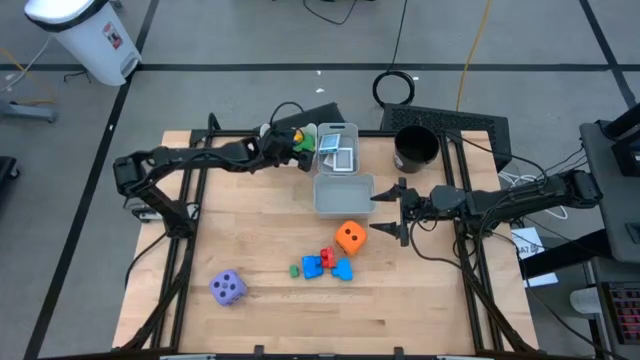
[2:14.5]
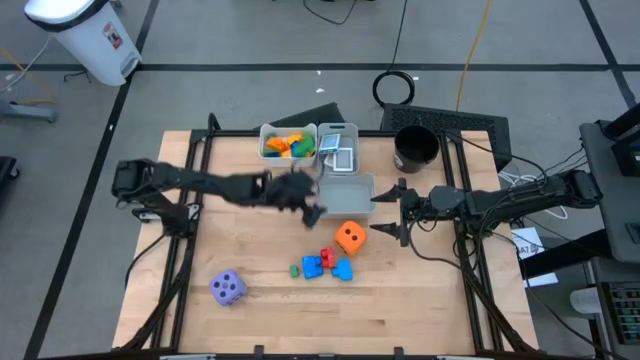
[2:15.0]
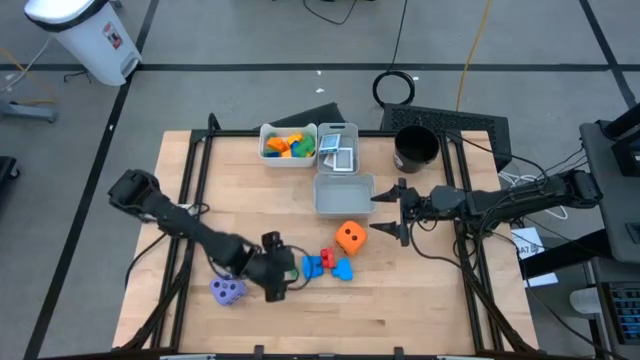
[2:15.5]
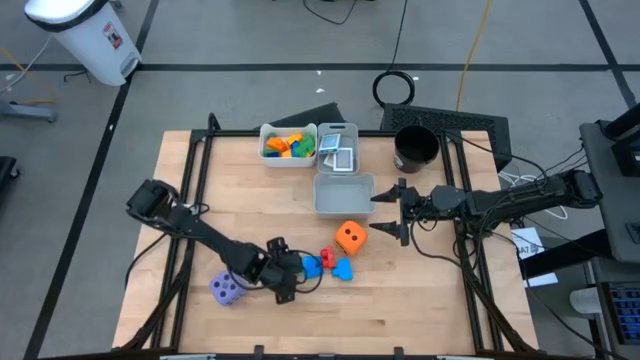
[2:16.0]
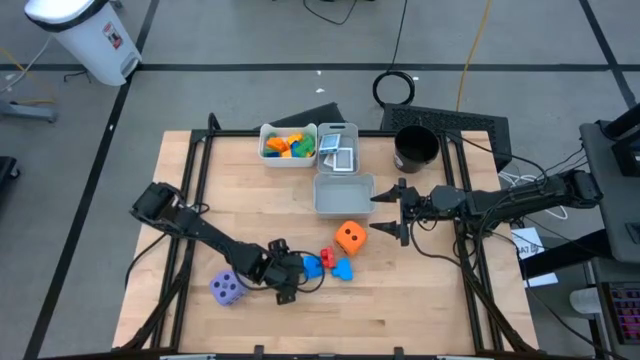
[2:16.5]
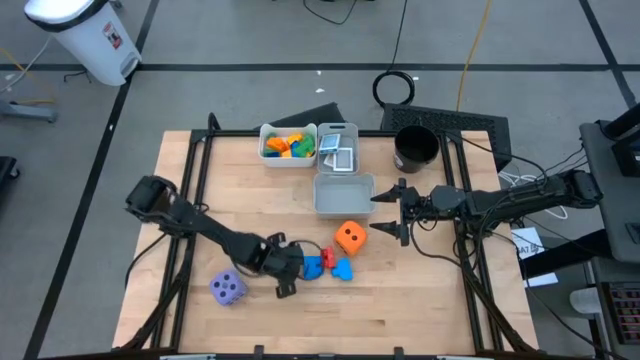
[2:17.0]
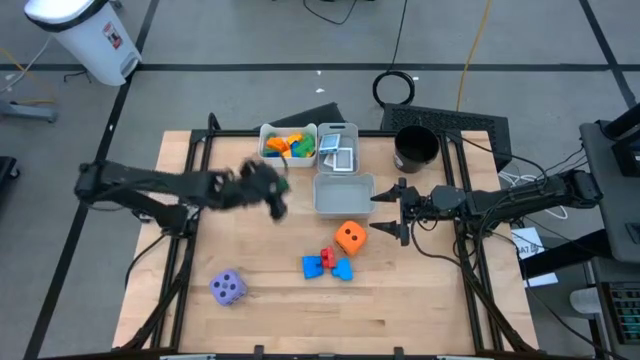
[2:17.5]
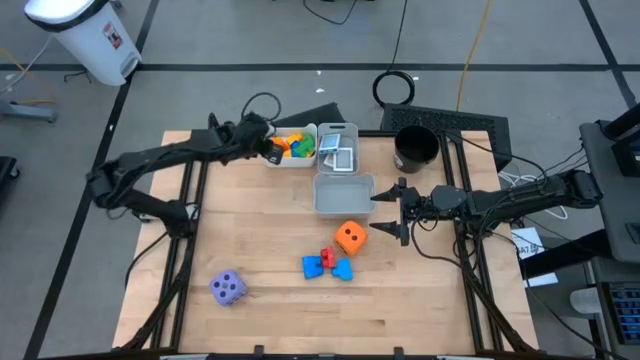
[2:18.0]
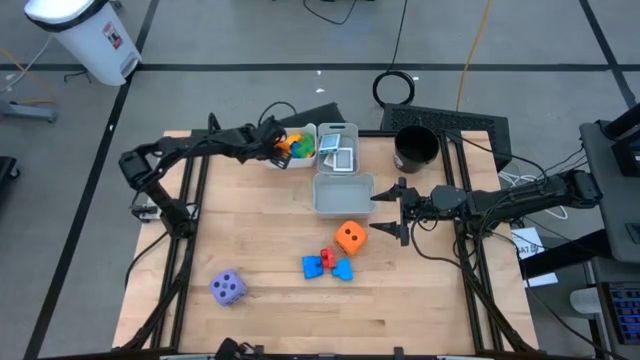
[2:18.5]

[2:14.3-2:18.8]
Task: Pick & Place Toys
Put the green game piece into the white bin

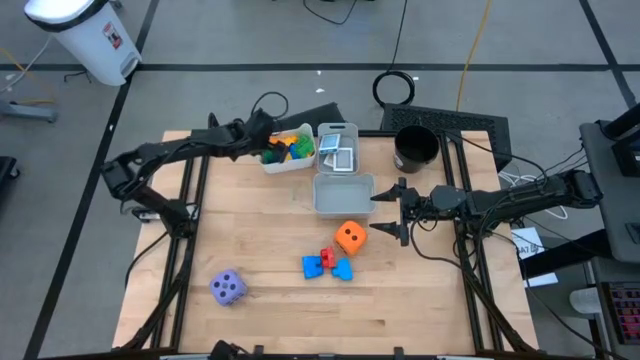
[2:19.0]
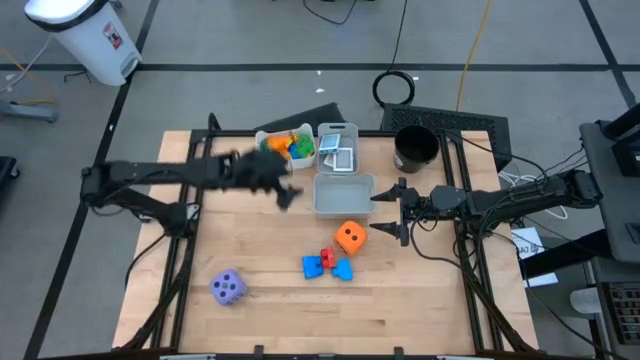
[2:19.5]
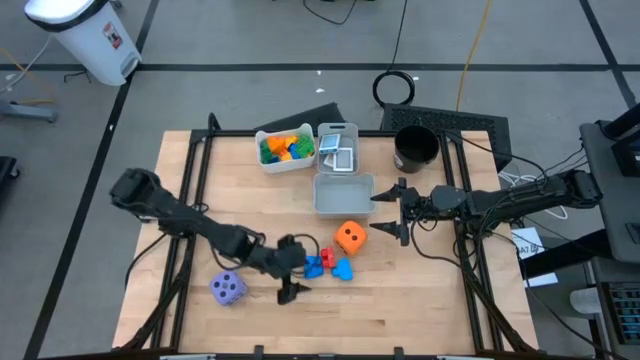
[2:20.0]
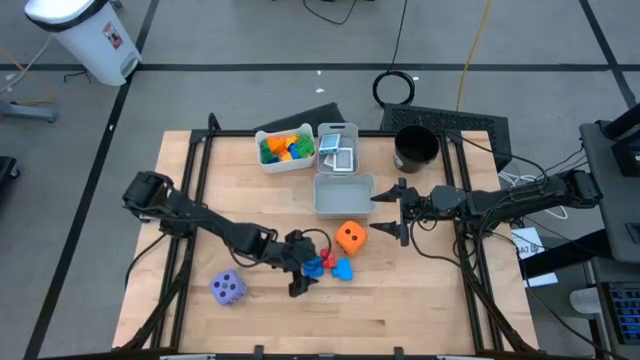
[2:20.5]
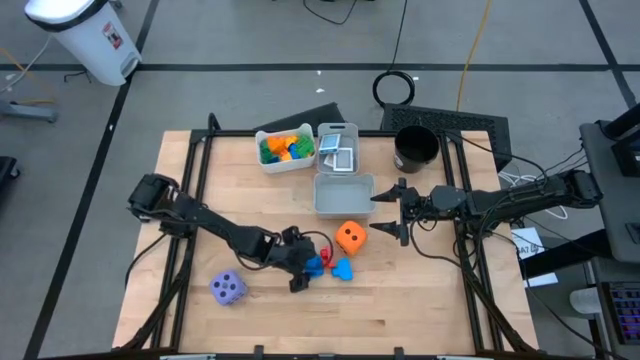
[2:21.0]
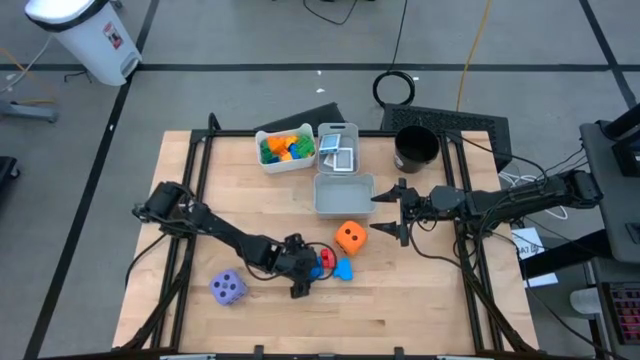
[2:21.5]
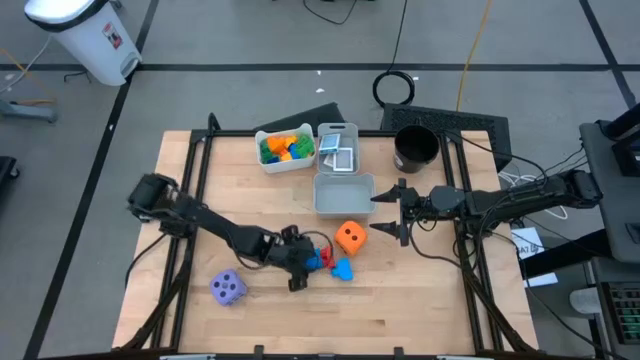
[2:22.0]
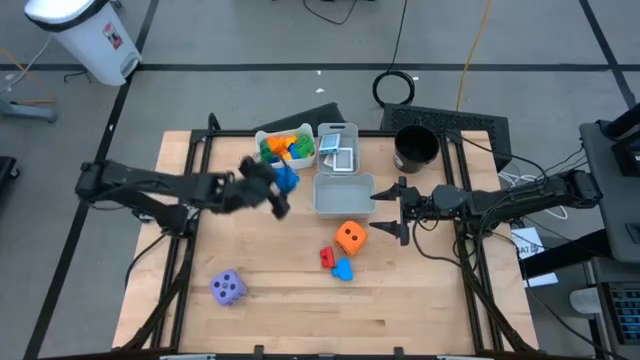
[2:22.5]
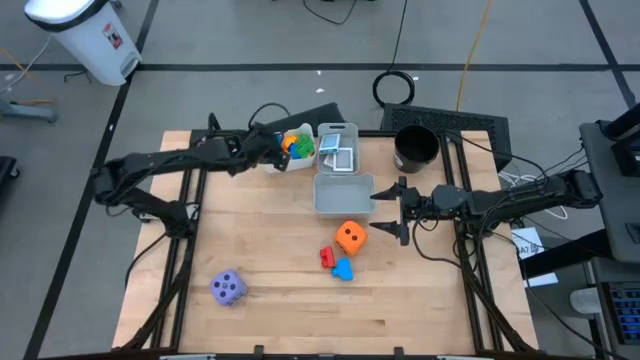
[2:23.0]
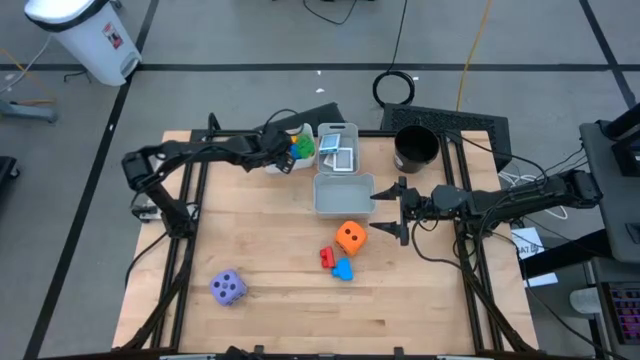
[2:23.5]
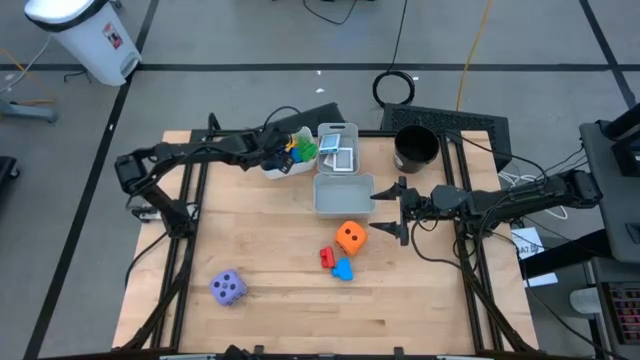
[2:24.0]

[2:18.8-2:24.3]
Put the blue game piece into the white bin

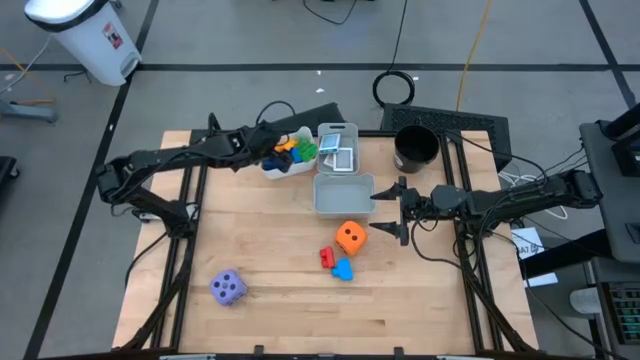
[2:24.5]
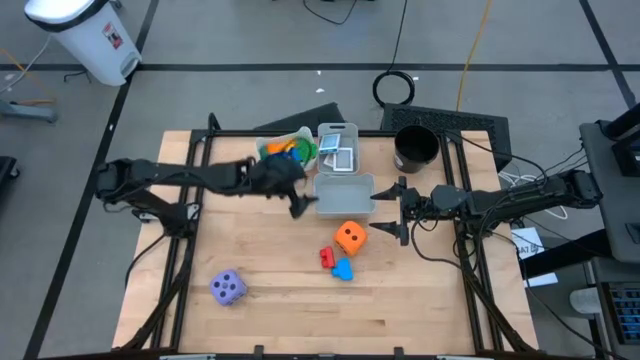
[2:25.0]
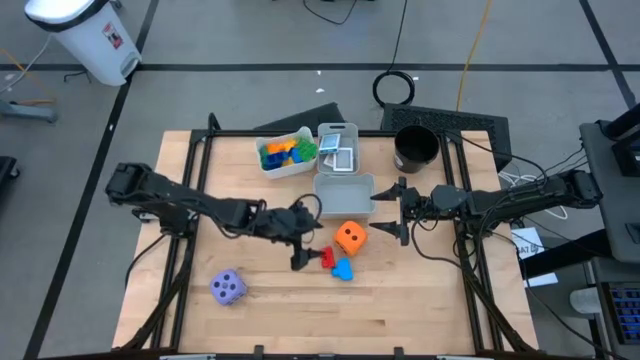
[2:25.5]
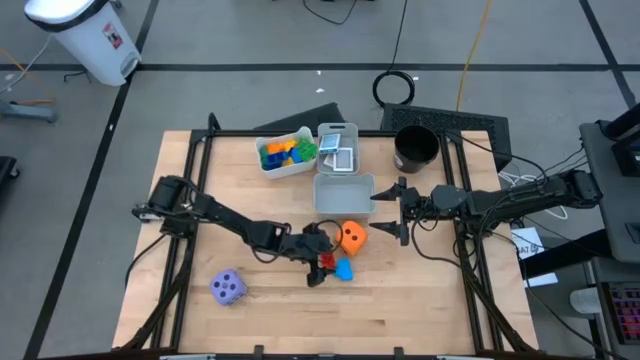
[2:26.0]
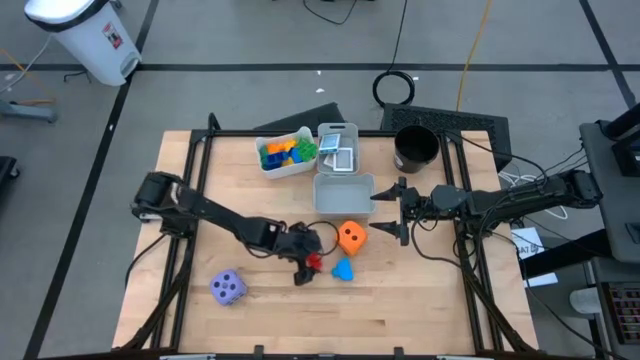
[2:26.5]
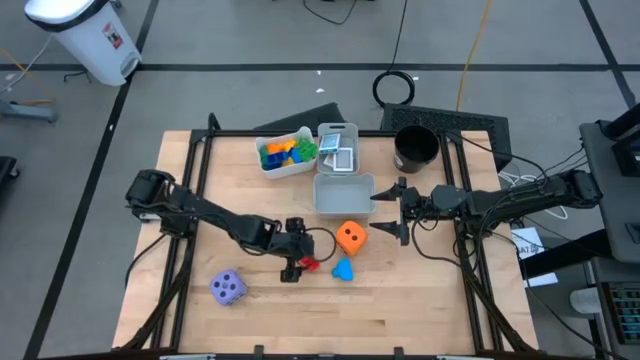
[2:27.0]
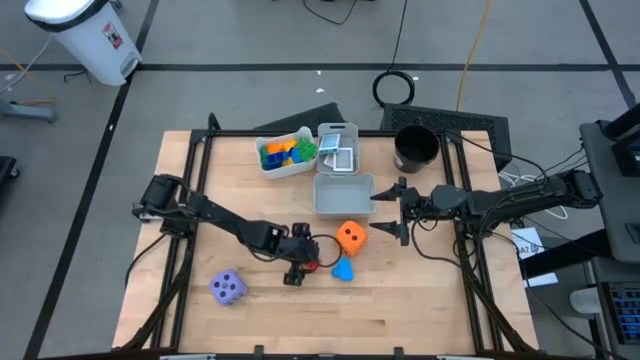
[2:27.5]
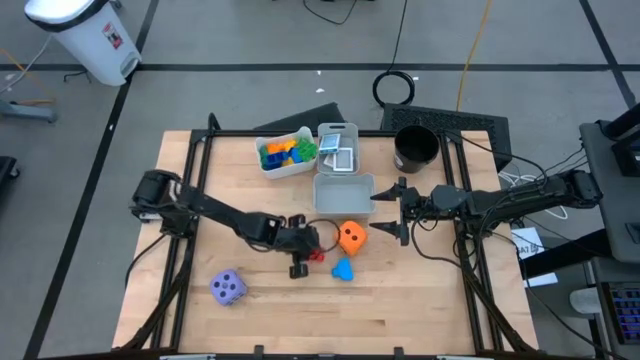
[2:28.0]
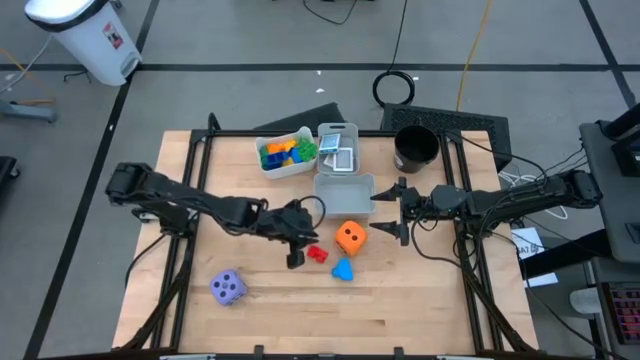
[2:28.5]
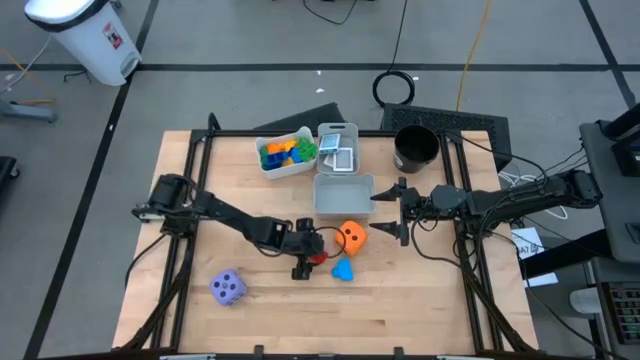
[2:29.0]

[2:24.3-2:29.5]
Put the red game piece into the white bin

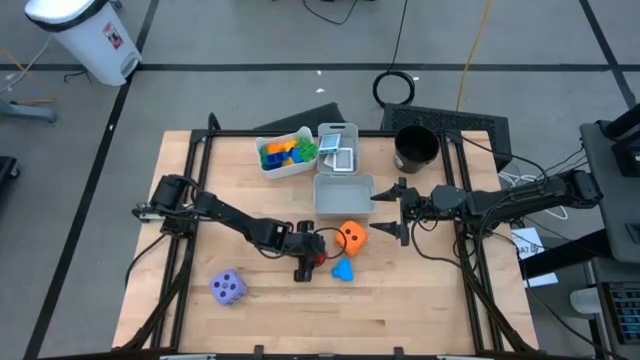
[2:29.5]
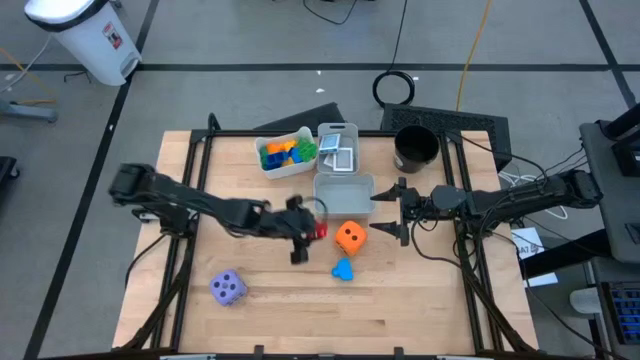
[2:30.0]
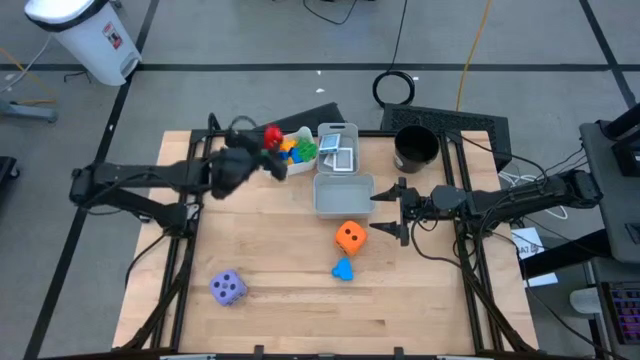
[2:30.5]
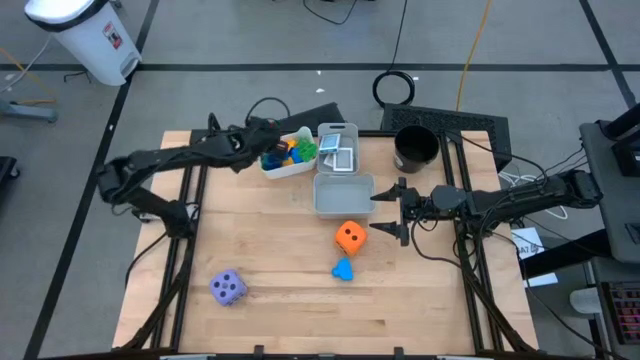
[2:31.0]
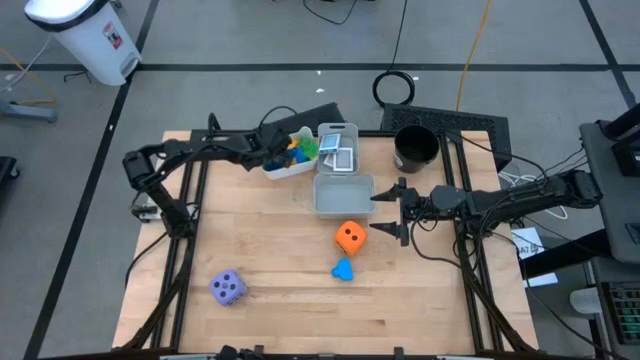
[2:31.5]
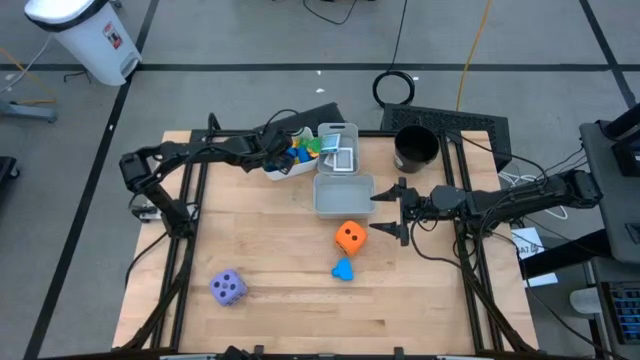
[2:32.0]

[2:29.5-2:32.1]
Put the red game piece into the white bin

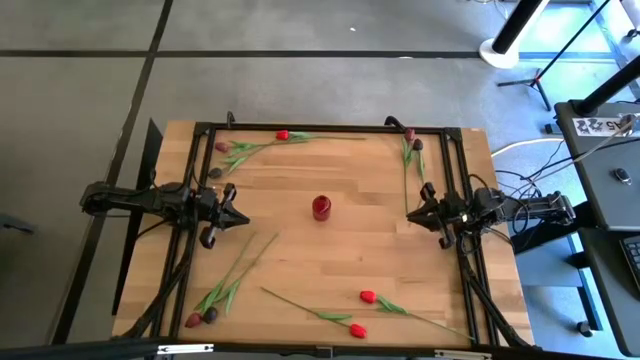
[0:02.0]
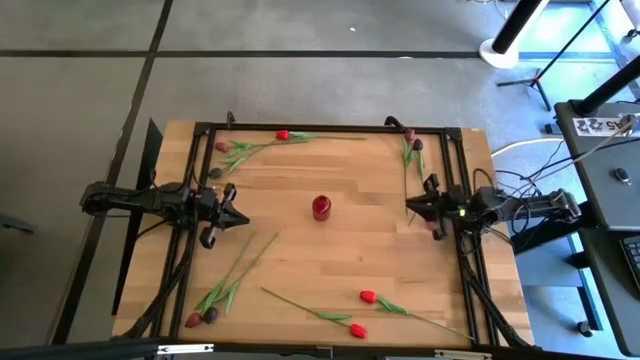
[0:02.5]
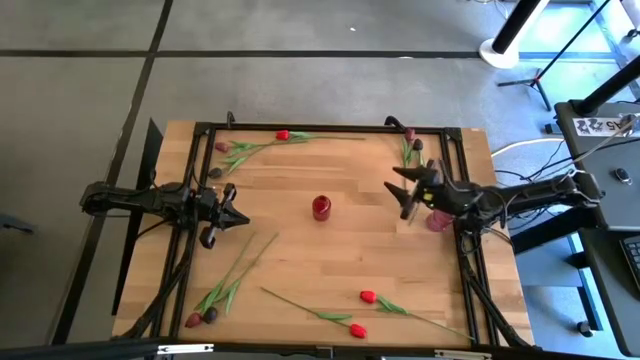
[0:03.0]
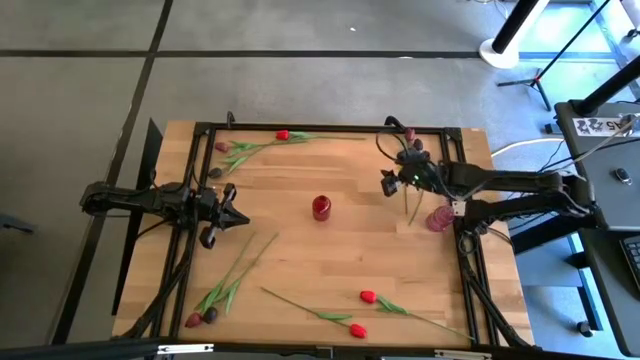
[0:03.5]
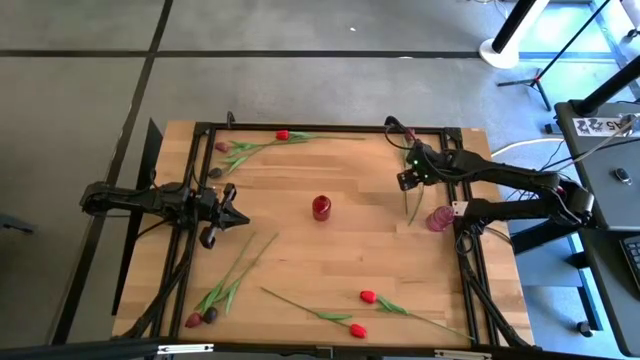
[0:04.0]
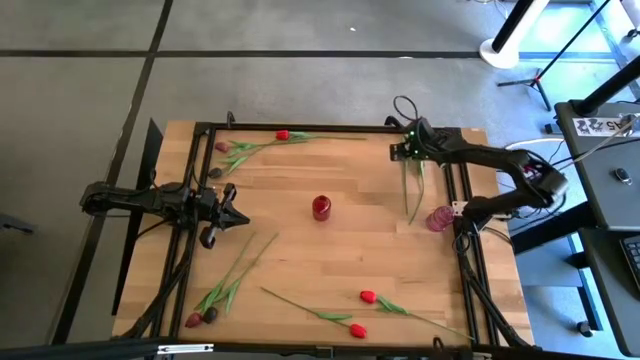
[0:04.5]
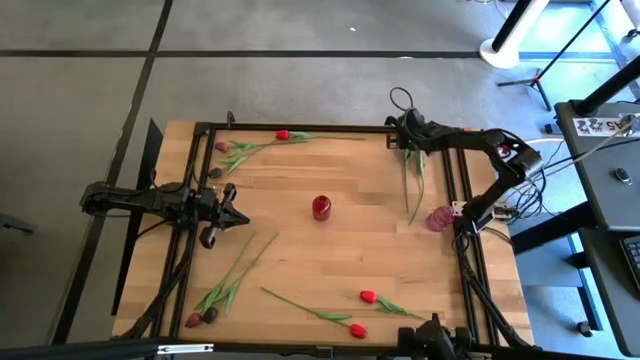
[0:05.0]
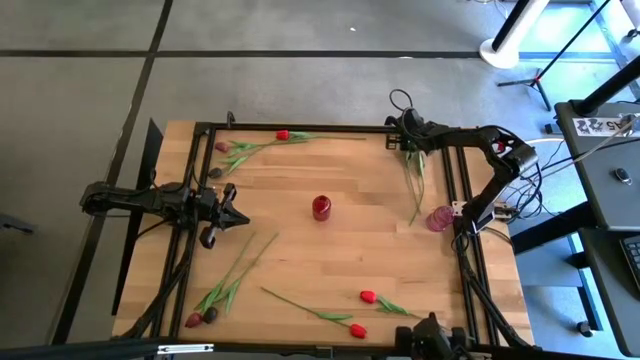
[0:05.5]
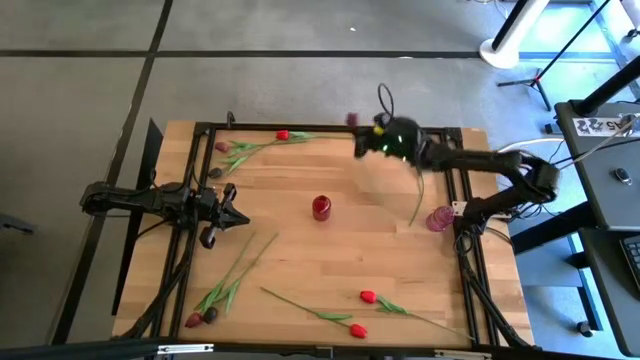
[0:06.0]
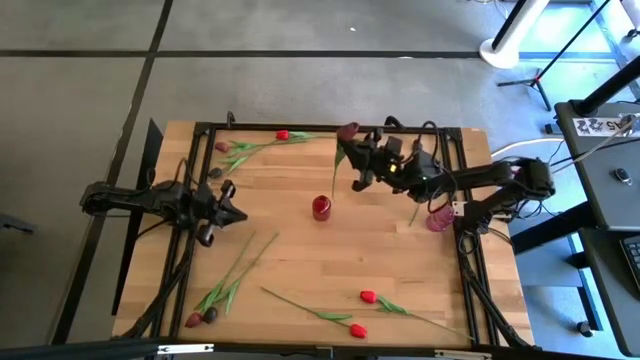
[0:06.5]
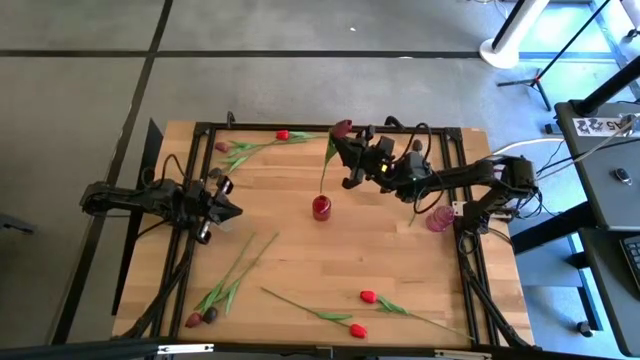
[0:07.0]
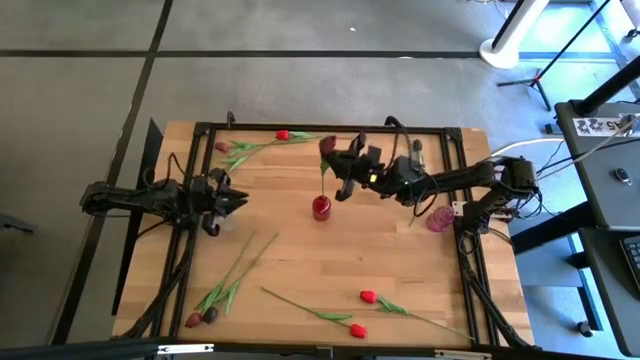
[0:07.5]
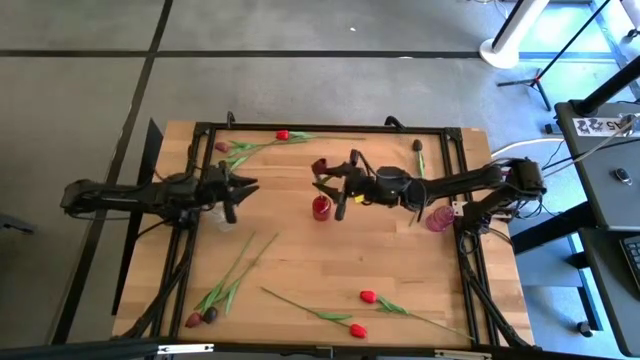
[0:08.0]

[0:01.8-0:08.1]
Task: Sort flowers into vase by color
Put the right dark red tulip into the red vase
